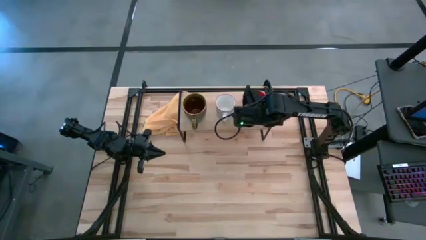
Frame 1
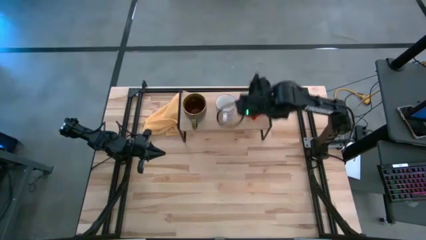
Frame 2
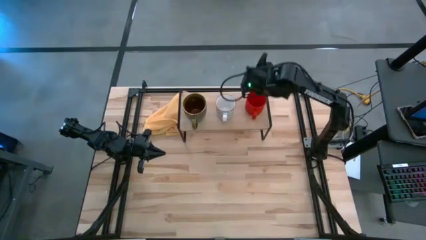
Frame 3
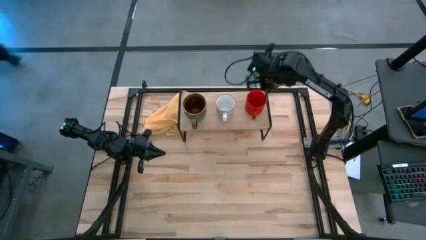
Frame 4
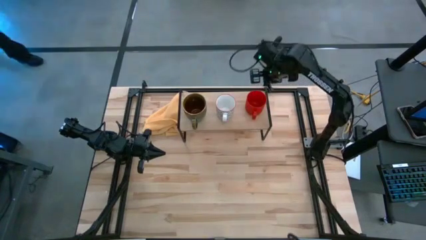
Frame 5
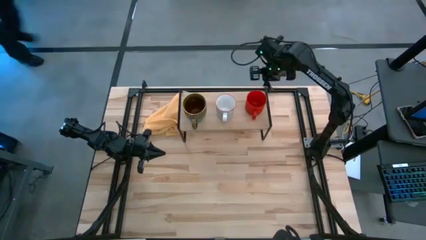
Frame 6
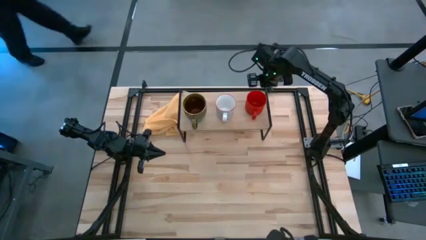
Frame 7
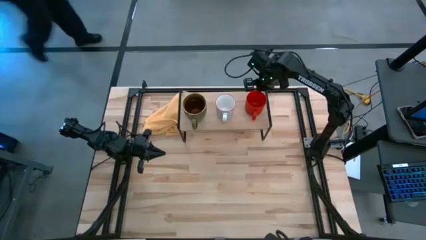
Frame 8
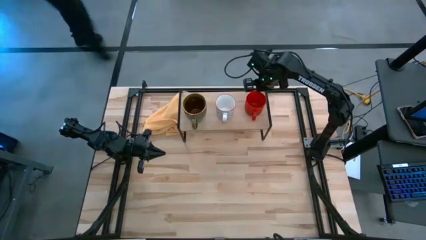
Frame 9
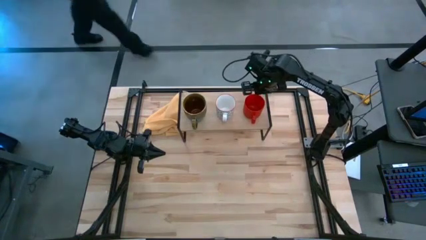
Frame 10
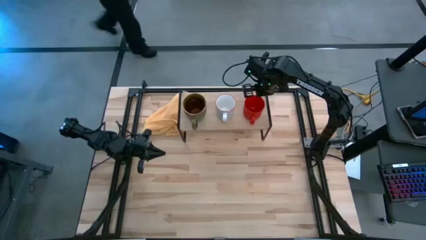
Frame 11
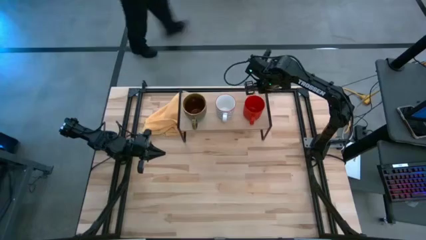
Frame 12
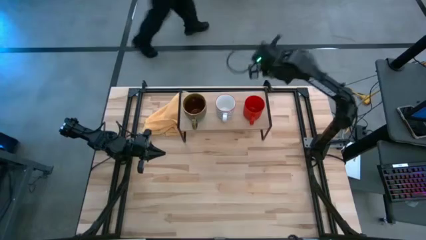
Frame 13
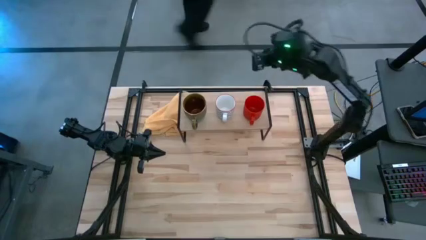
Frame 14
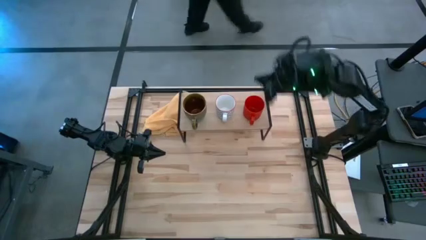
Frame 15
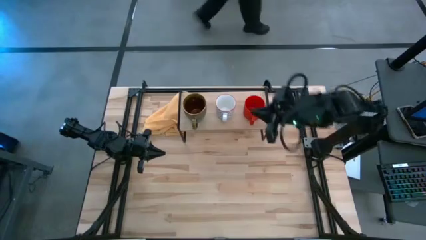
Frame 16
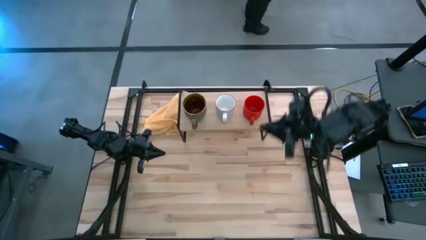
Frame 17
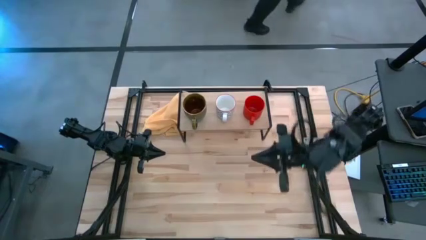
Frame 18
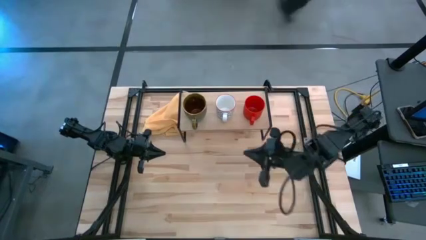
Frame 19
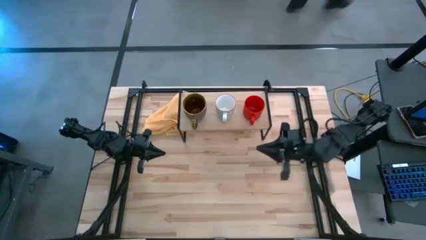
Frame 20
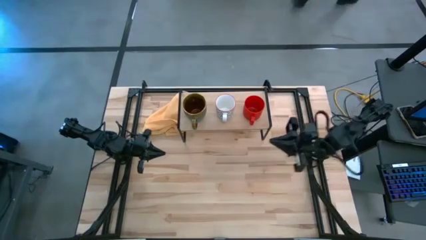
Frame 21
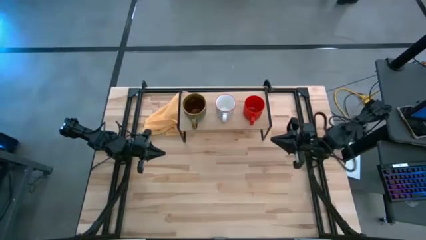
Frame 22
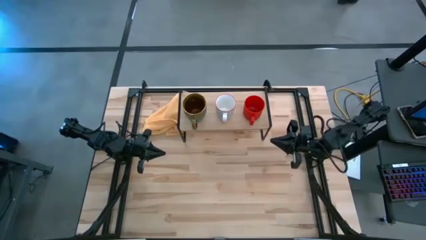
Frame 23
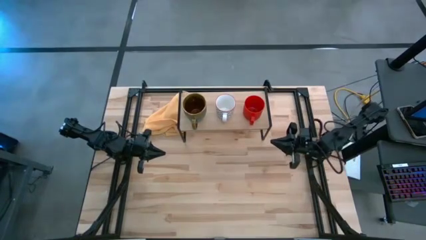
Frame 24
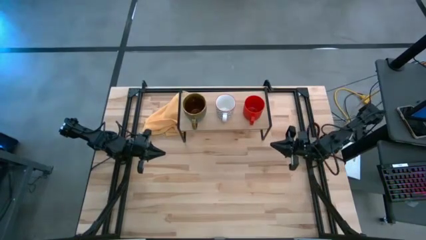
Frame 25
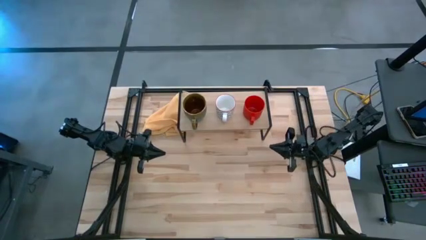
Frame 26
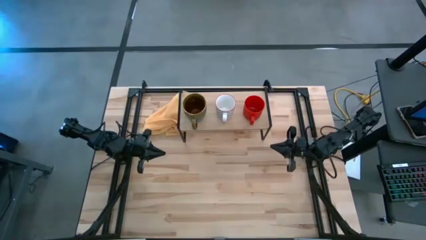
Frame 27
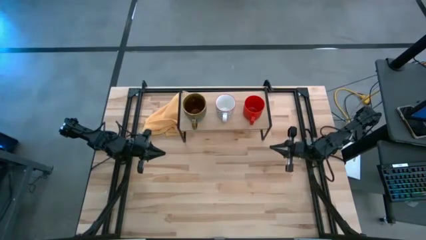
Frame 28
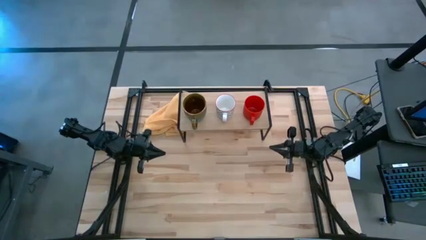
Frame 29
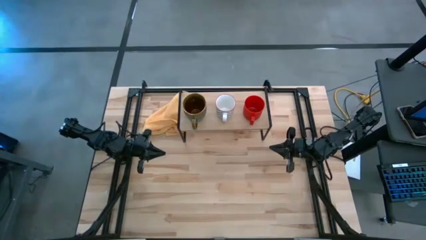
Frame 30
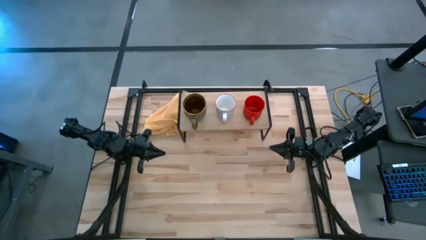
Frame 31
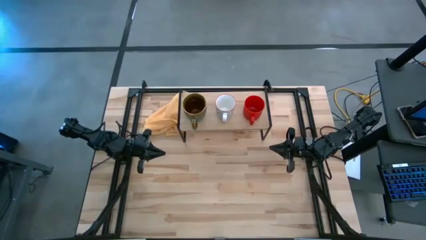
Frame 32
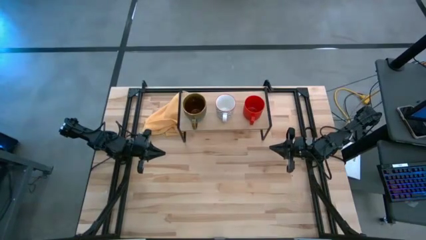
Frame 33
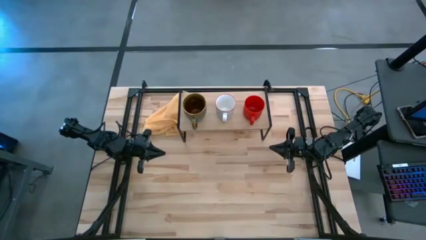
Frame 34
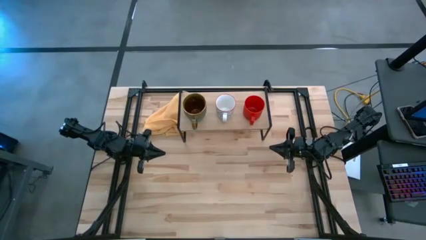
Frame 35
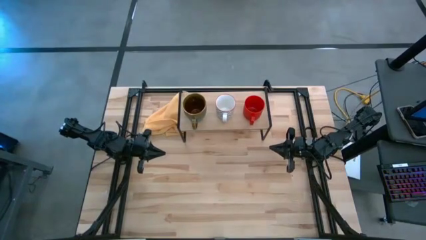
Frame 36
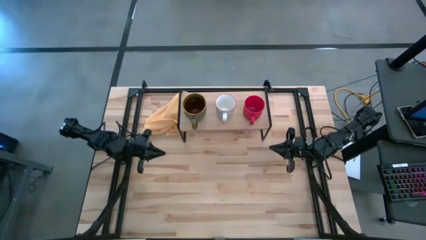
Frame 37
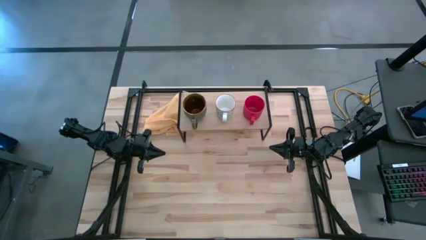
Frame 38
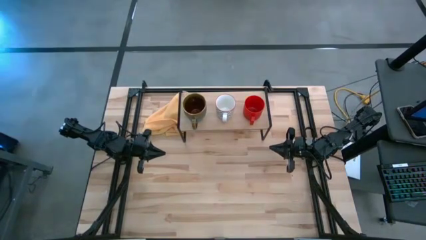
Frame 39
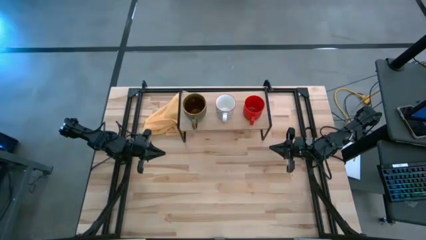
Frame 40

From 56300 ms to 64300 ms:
Task: Stack small to large cups/mugs on shelf
Return to Home Position

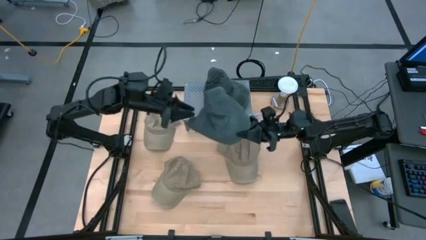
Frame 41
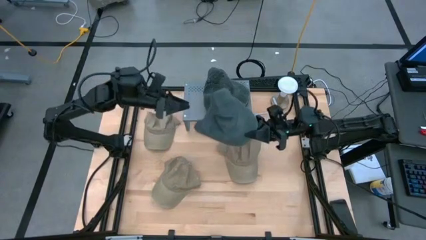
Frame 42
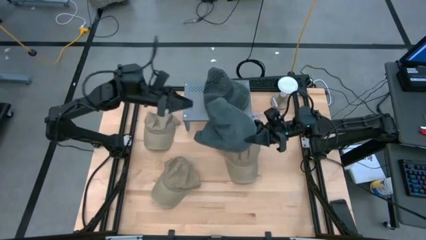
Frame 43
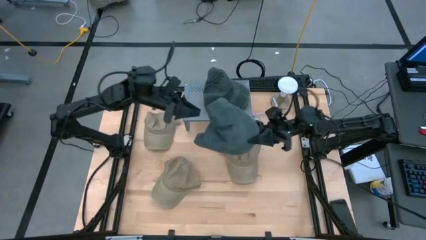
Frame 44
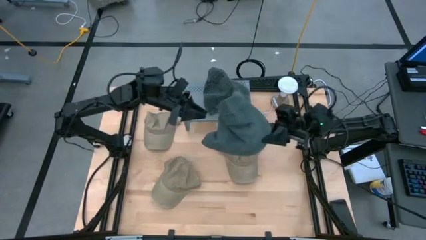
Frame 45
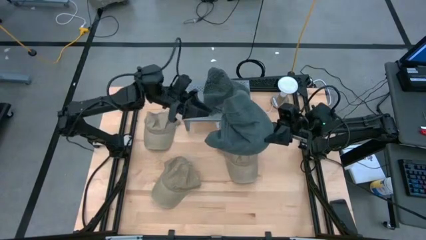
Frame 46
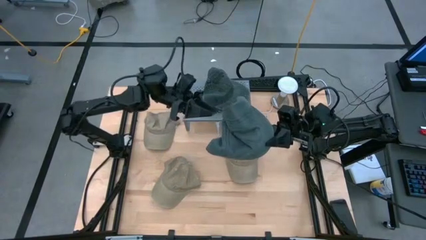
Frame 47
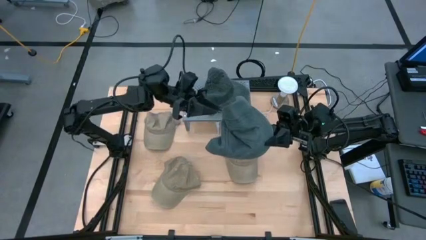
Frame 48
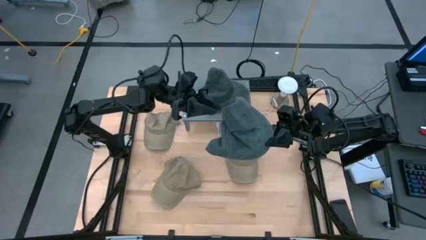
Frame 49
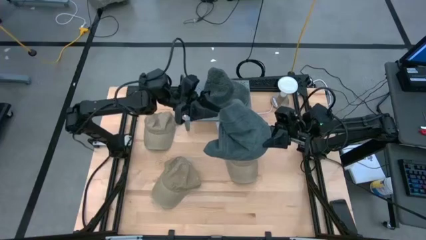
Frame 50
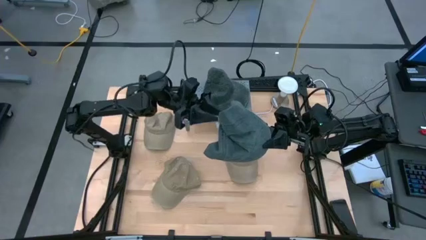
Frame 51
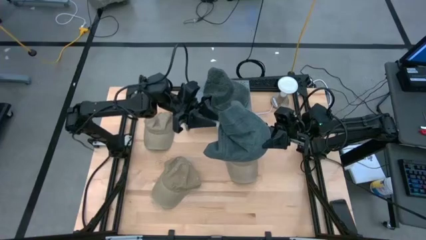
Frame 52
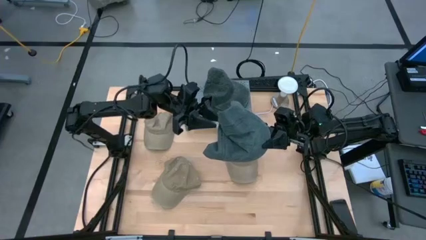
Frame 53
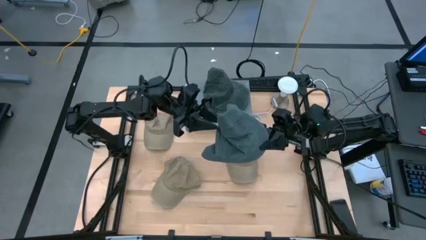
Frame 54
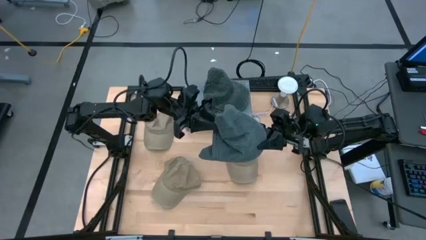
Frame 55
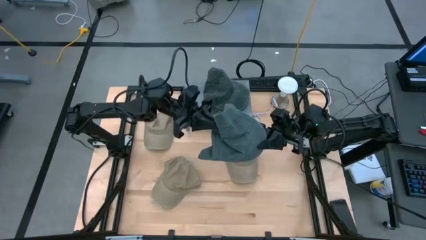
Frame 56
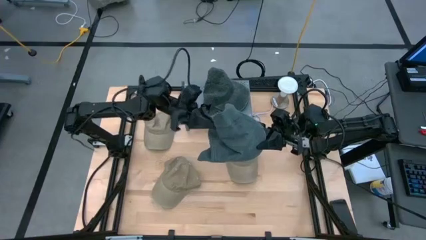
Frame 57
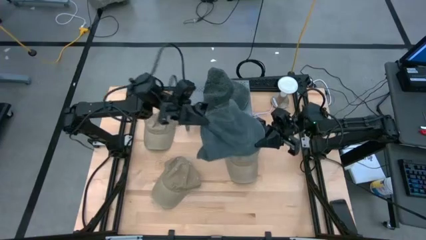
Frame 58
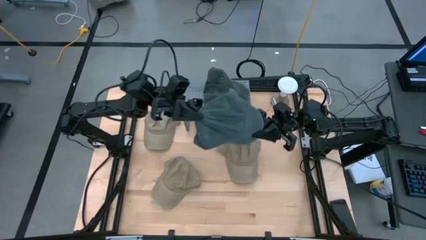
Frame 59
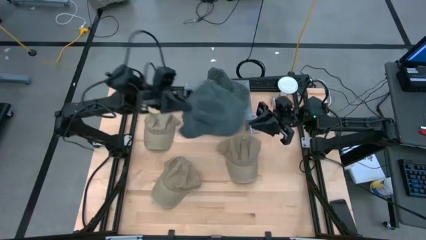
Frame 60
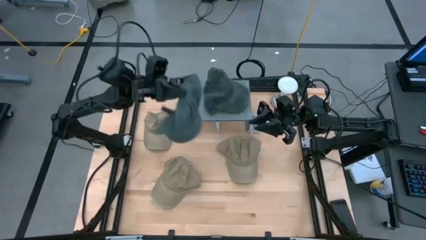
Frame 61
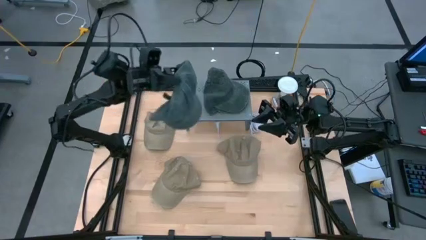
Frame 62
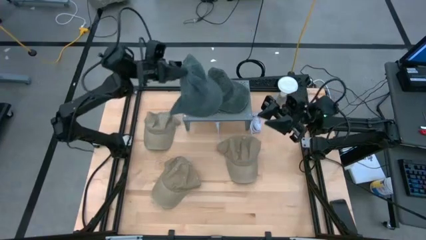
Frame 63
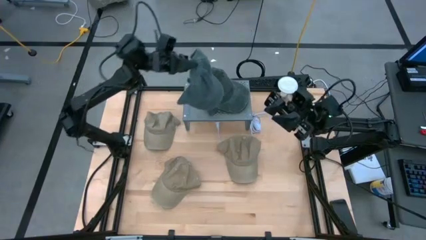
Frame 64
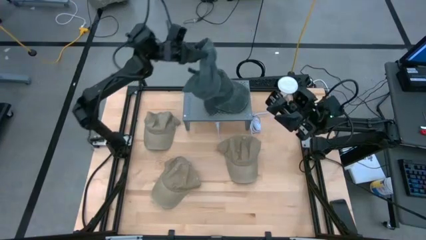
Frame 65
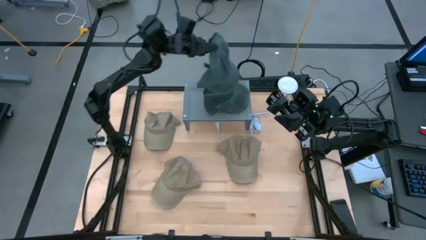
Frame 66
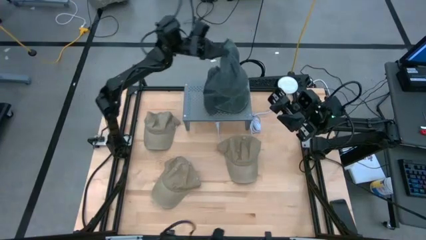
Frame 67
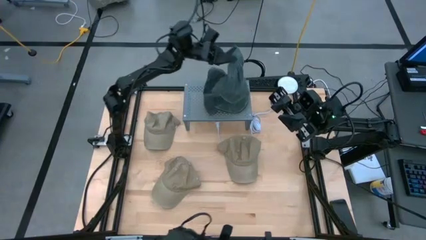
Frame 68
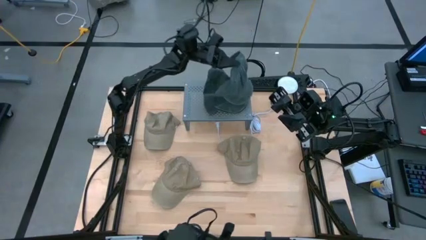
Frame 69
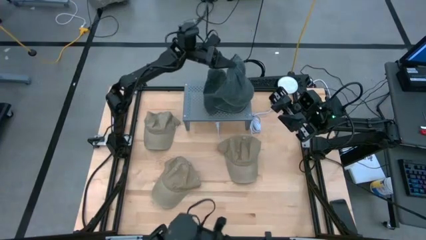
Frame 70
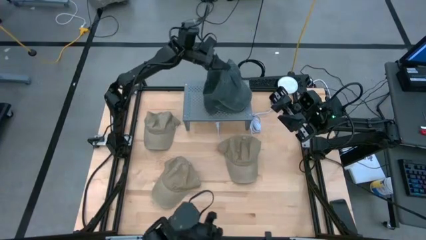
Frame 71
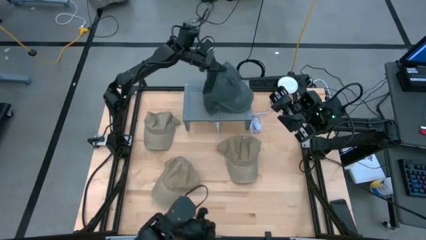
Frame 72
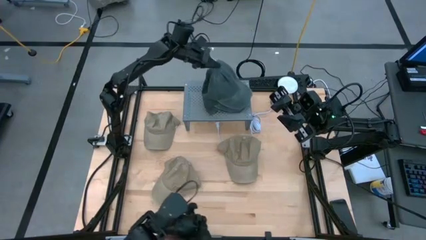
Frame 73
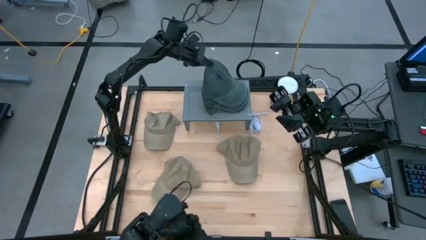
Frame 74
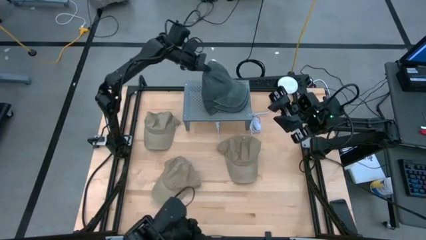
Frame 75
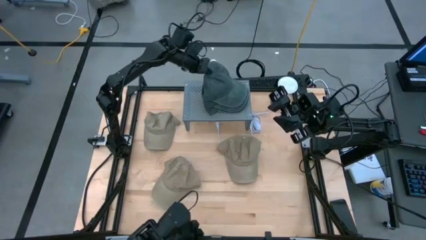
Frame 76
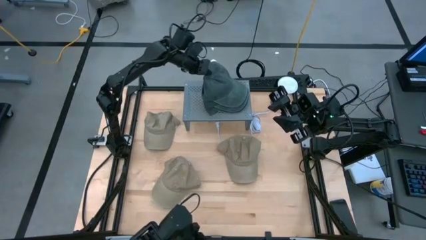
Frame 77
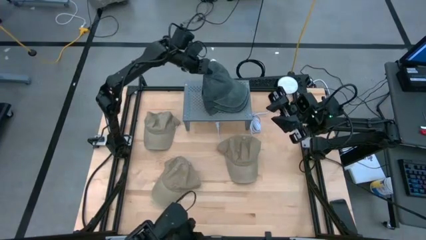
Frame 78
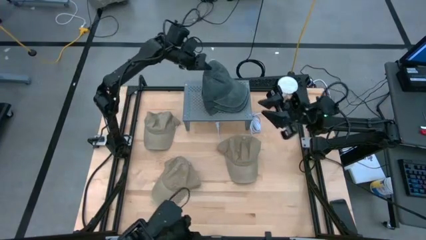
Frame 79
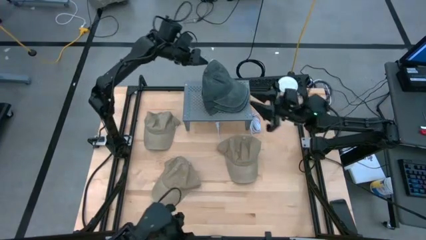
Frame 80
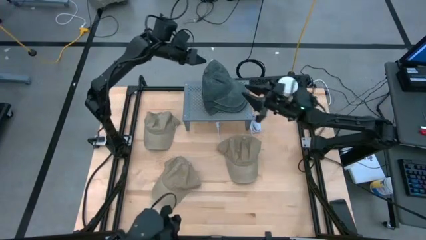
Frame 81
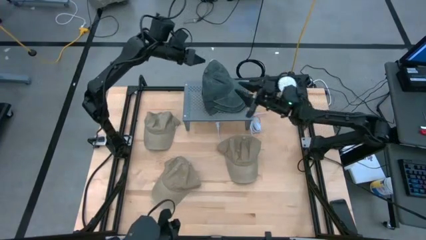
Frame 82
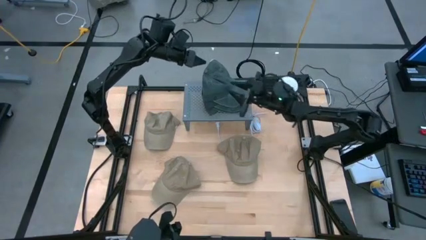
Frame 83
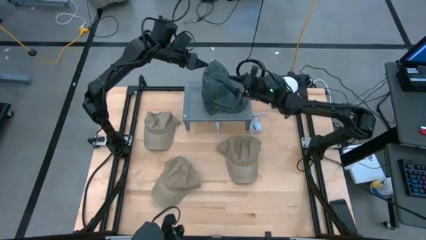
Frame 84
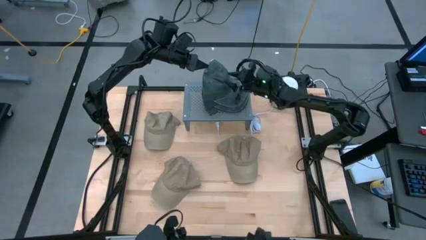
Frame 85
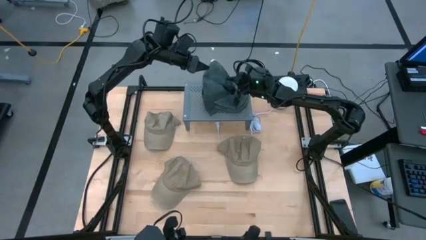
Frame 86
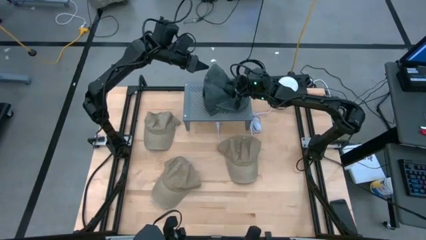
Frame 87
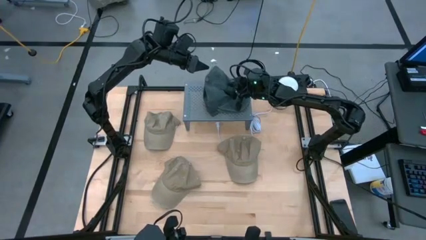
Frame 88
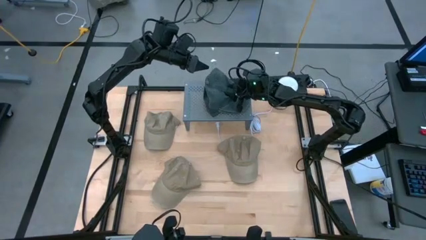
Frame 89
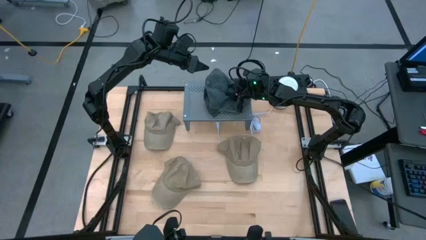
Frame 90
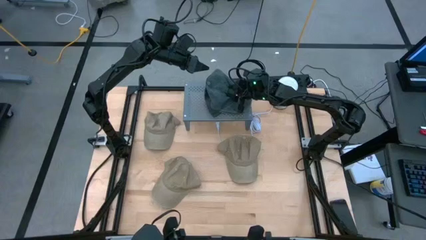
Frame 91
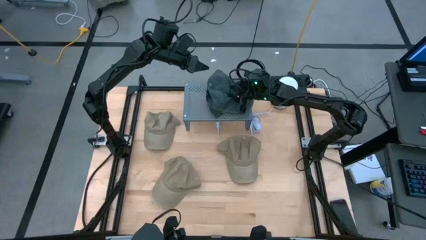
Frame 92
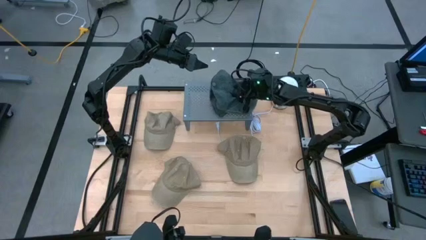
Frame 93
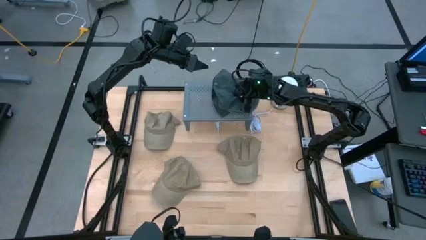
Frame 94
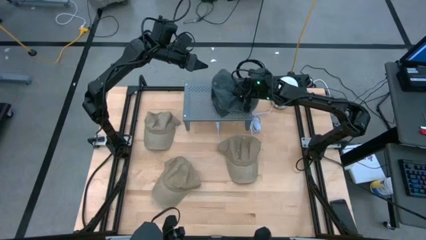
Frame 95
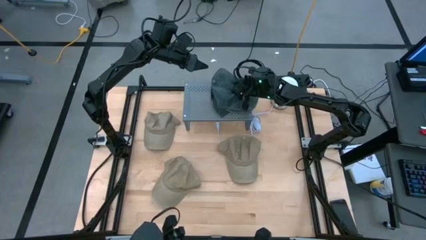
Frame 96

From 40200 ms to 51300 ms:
Task: Pick & Place hat
Stack the black cap on top of the black caps on the shelf
